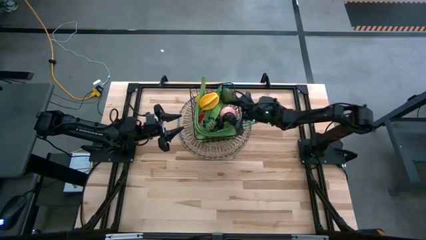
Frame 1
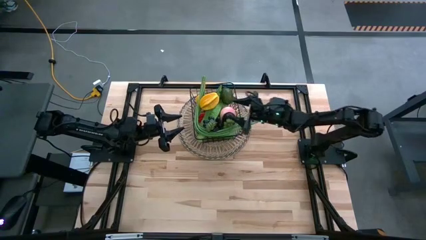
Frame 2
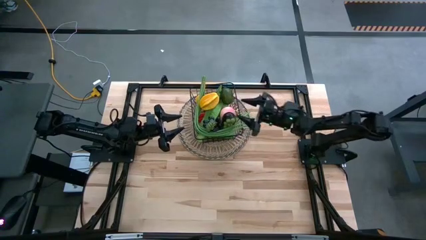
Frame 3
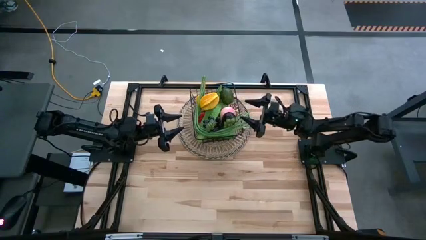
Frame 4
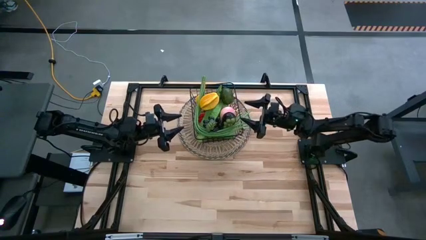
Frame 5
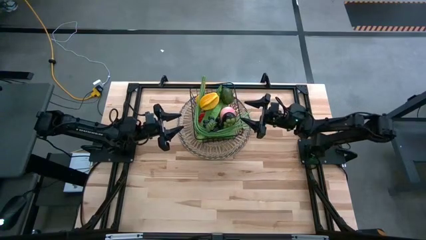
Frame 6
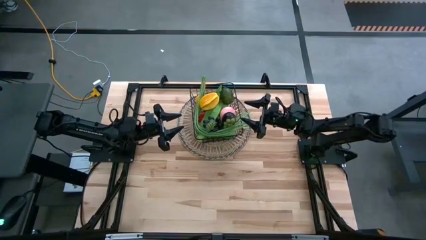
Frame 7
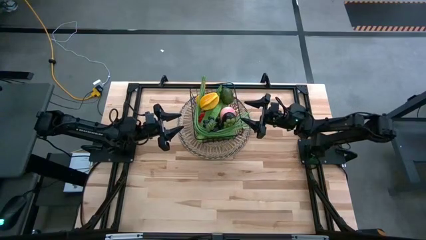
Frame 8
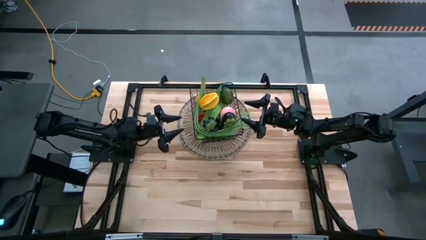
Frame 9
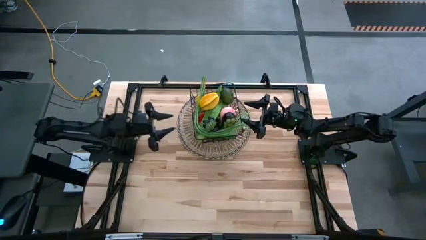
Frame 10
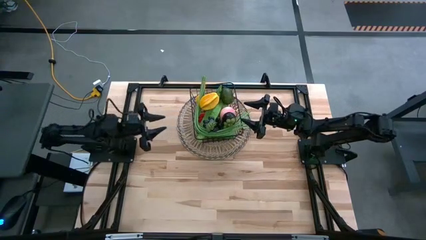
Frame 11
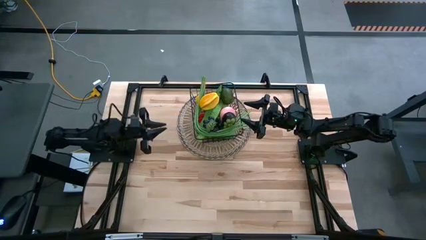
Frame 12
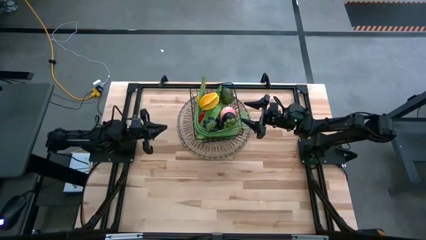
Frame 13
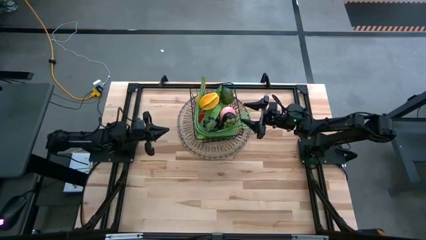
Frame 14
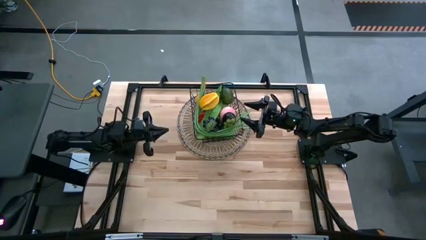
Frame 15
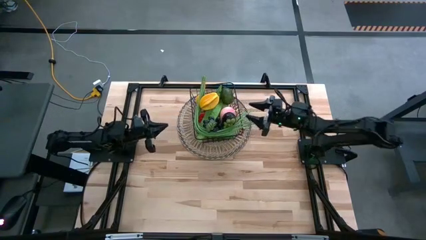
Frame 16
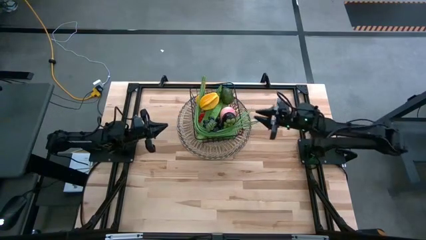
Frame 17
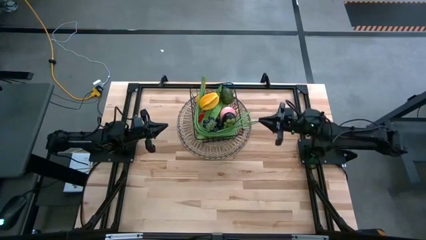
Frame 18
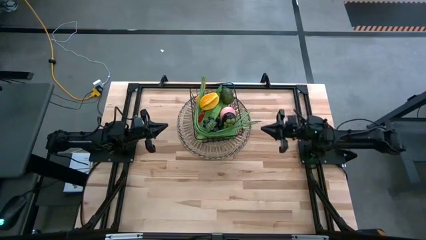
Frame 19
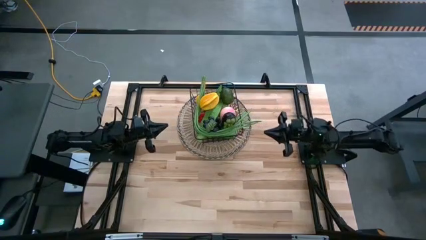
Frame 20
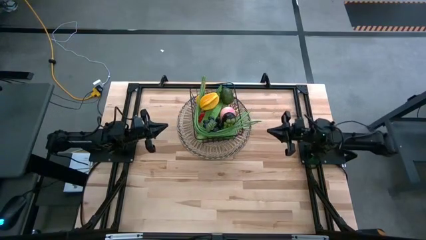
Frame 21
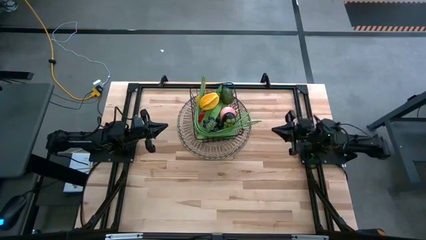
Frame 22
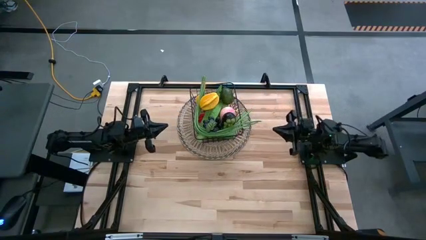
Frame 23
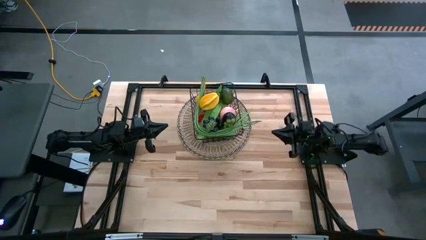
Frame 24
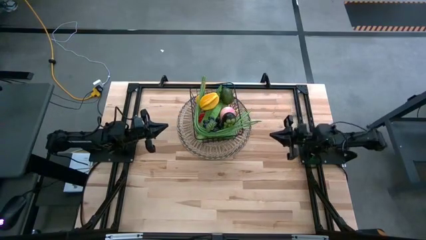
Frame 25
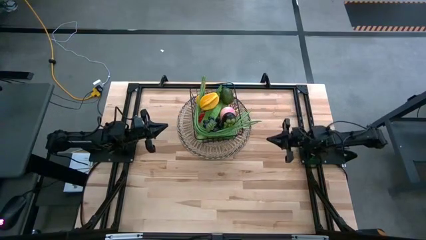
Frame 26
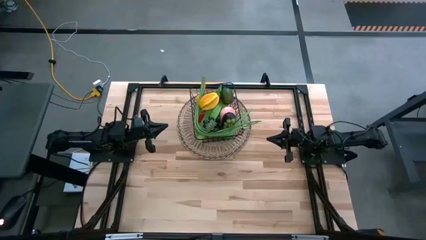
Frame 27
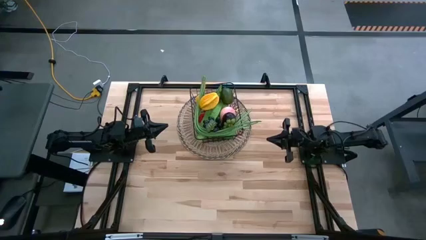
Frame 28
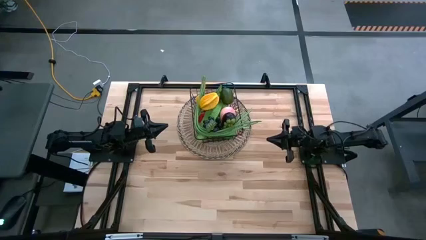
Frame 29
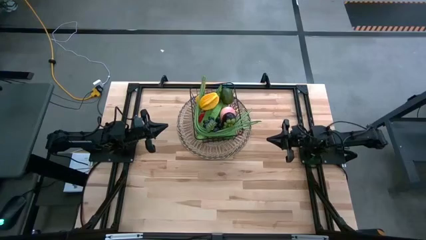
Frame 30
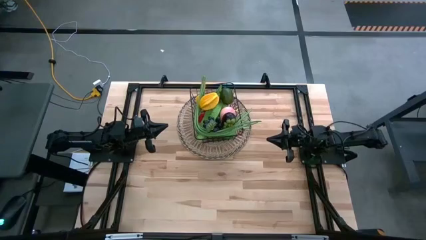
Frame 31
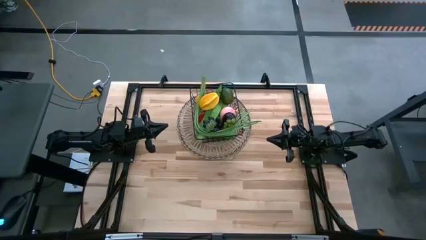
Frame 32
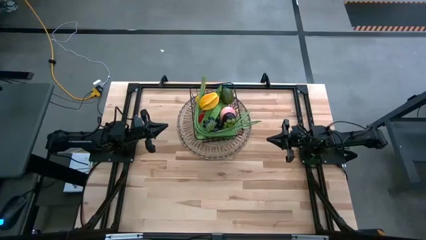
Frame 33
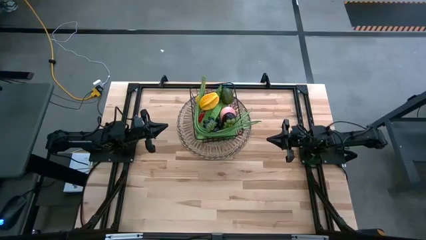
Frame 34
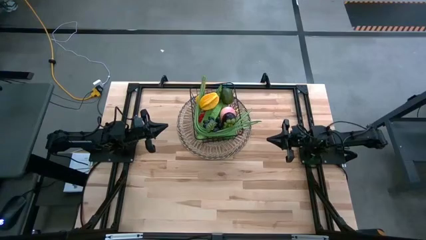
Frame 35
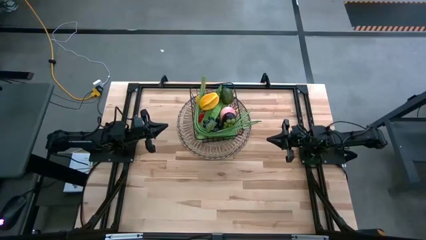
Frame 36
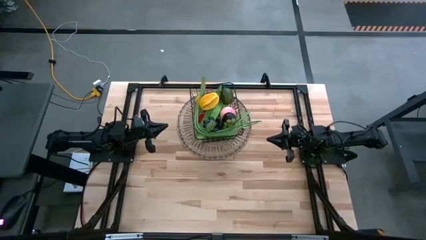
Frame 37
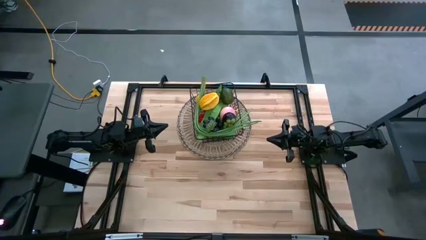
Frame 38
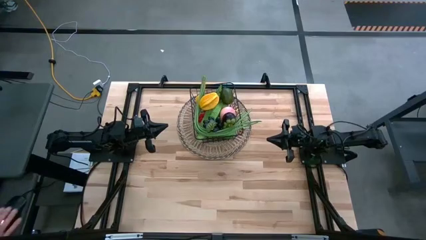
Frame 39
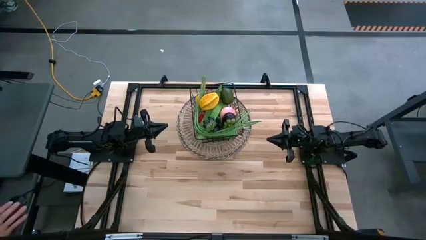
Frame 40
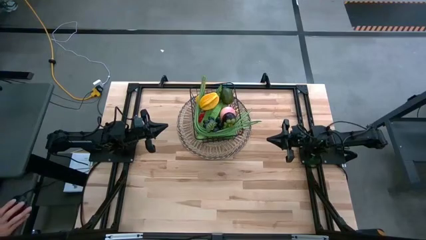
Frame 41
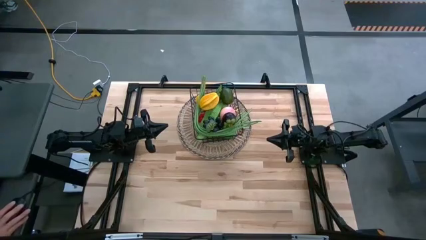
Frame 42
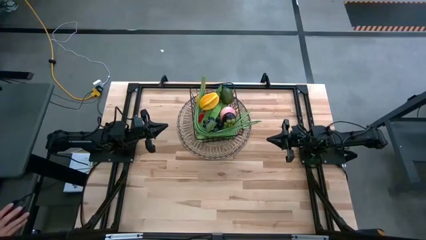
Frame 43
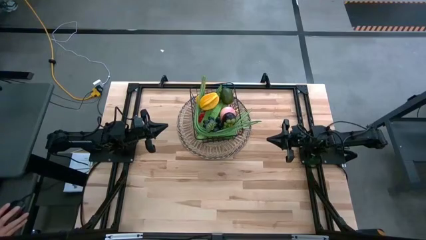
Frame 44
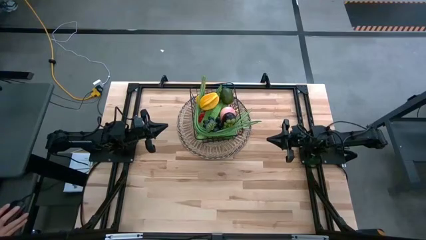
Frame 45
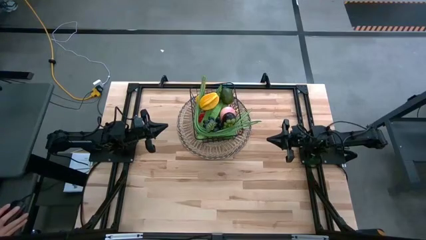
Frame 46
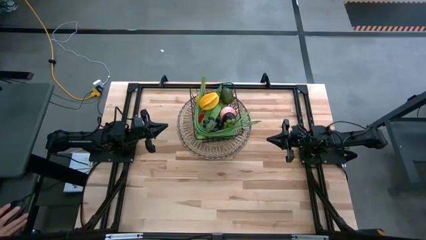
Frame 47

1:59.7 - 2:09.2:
Task: Build produce basket
Return to Home Position

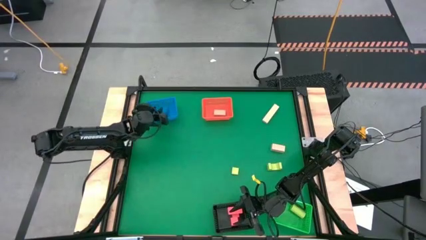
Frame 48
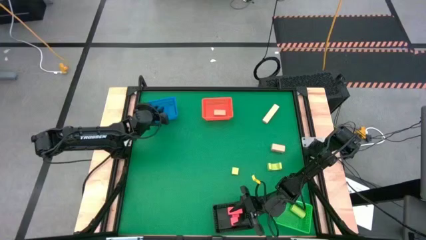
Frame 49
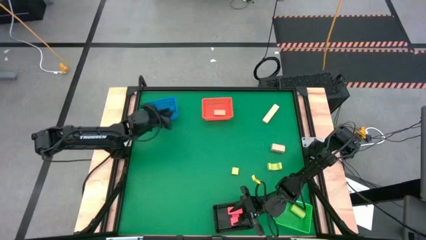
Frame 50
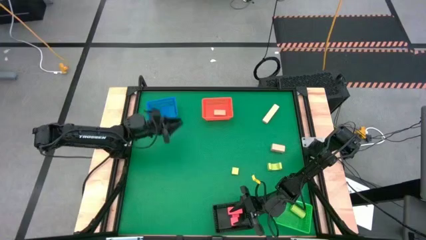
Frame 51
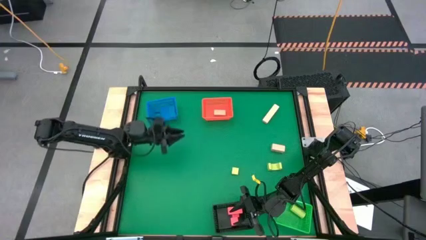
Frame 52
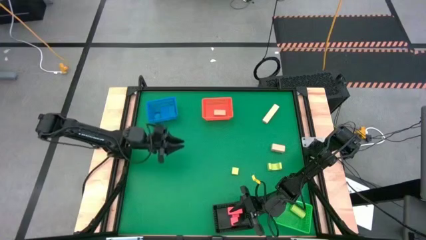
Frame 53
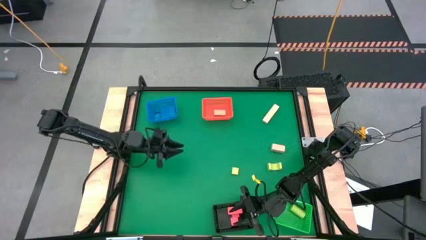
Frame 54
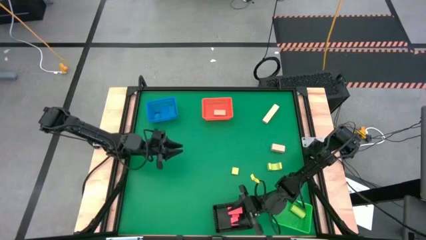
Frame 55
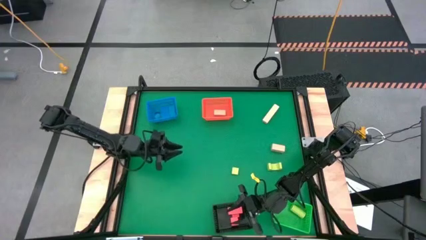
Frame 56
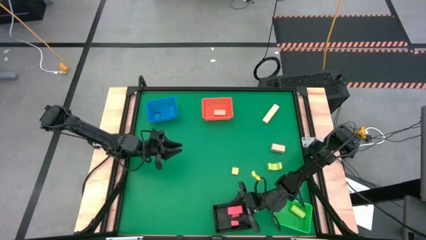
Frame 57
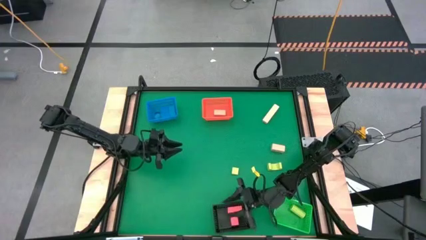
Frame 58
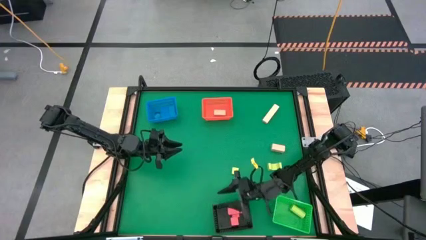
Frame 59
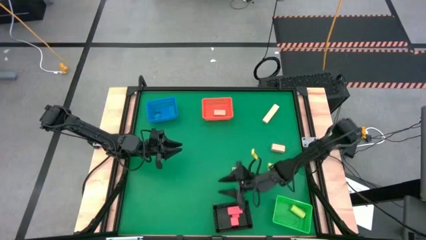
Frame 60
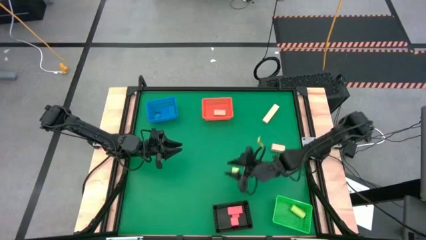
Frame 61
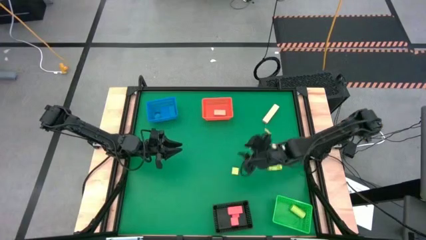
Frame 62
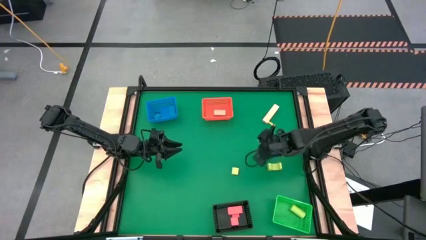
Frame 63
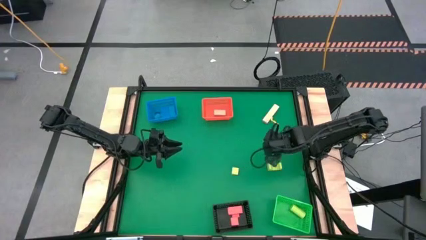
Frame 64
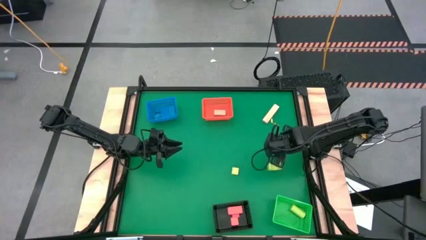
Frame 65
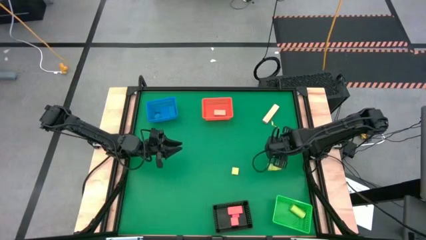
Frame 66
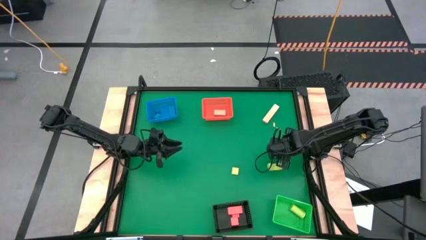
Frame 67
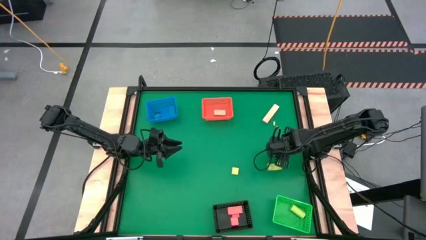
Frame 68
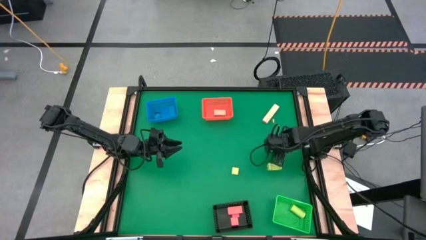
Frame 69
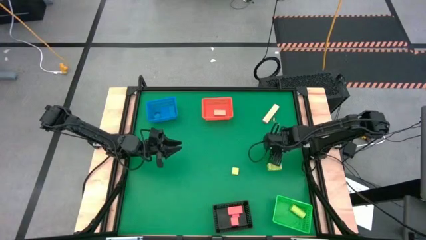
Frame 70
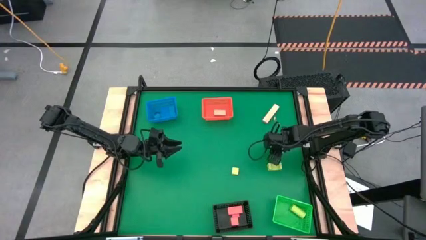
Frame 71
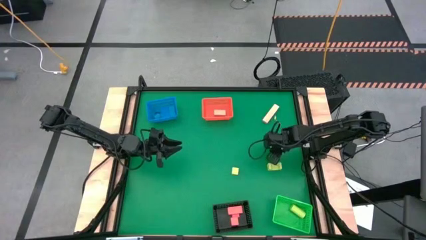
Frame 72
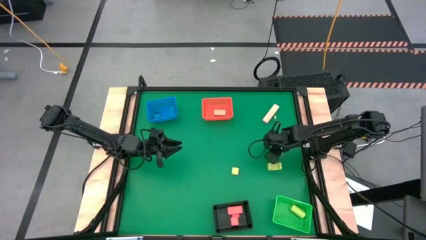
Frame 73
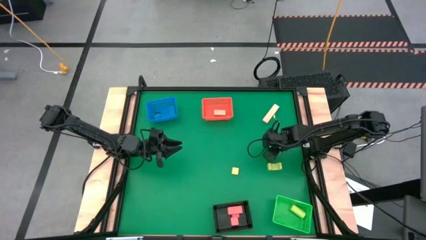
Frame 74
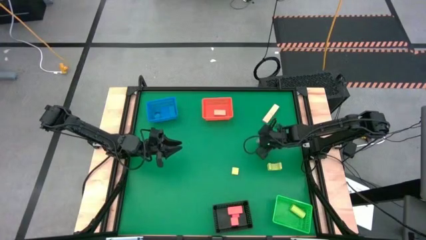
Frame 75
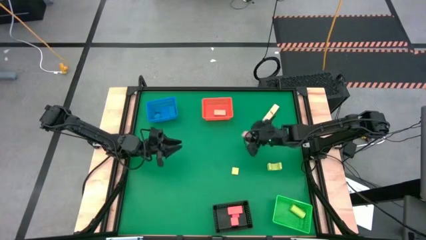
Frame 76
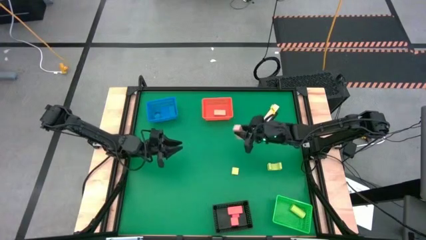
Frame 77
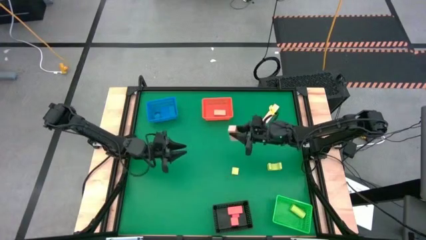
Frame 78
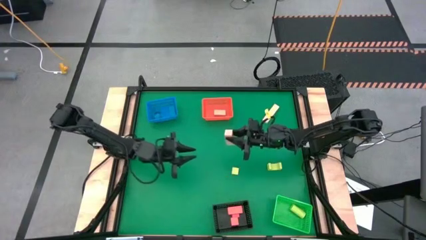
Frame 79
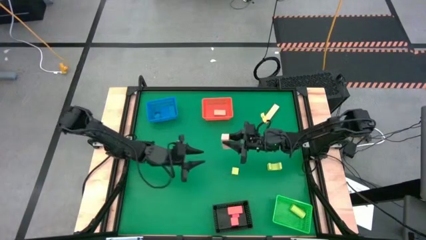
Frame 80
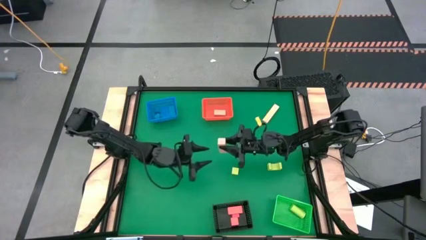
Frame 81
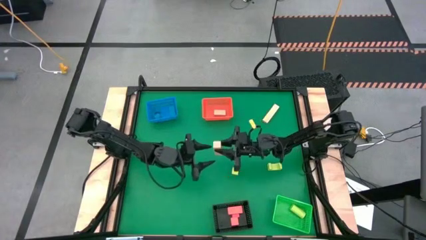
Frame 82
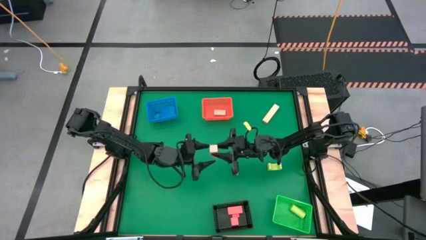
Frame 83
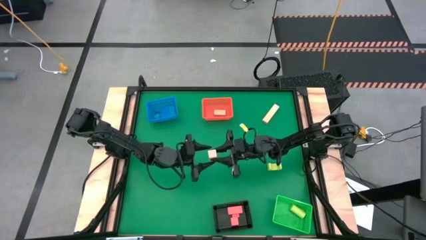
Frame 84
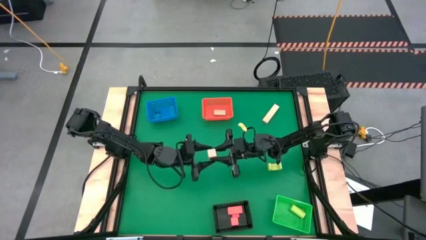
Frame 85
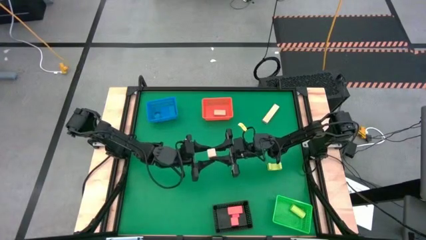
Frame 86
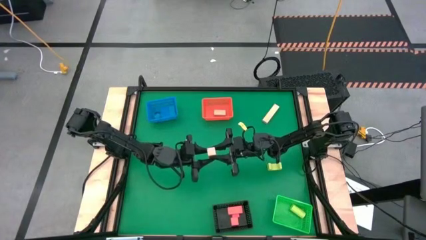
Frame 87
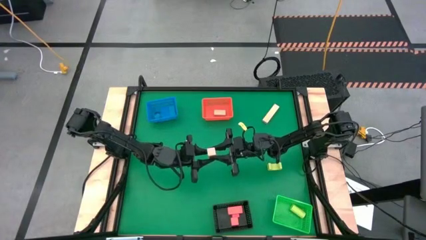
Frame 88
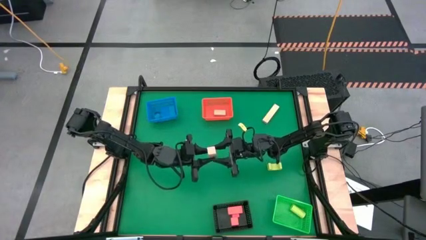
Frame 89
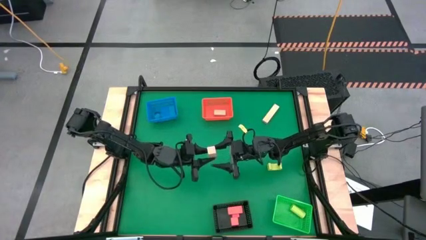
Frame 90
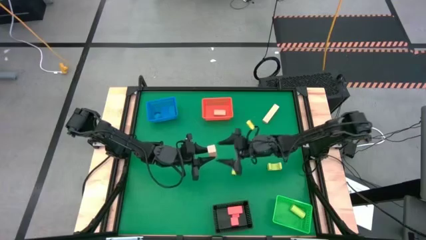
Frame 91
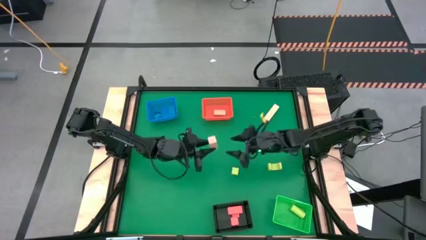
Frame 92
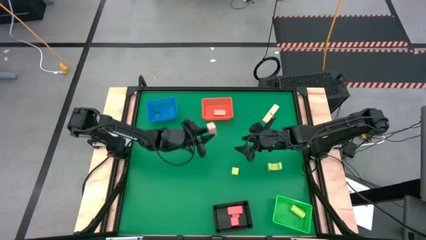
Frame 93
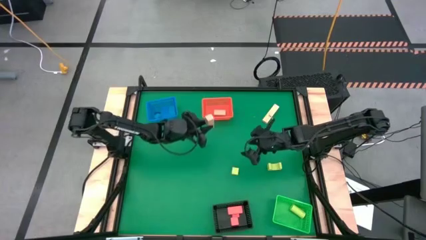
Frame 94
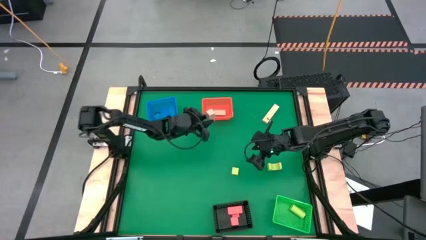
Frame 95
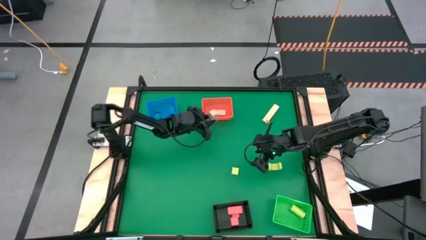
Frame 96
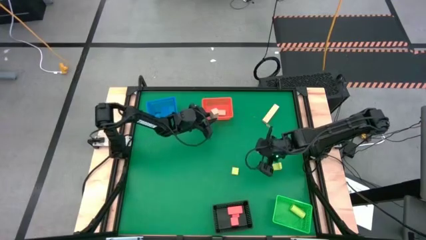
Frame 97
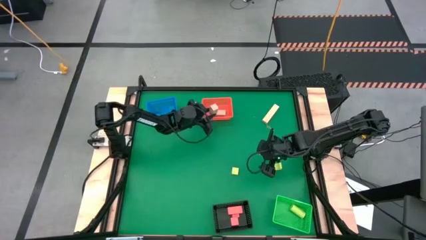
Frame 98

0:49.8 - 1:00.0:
Task: Sort & place blocks by color
Put the bottom brown block into the orange bin
